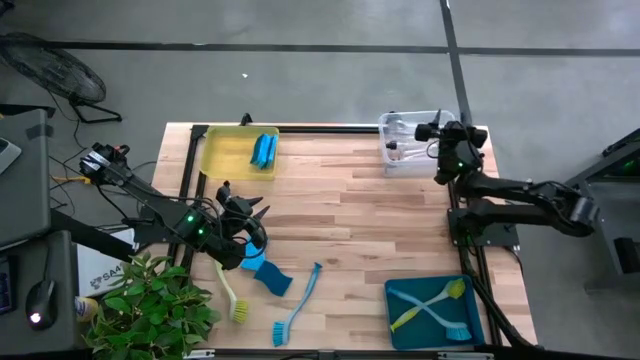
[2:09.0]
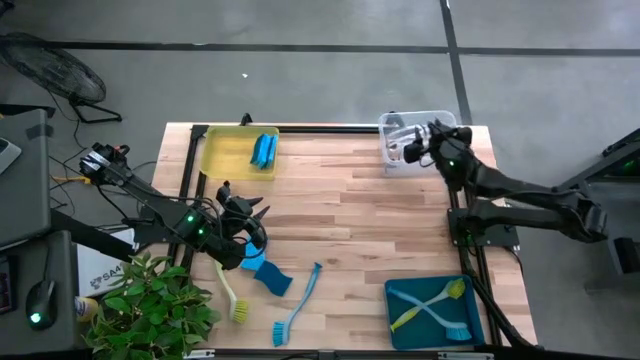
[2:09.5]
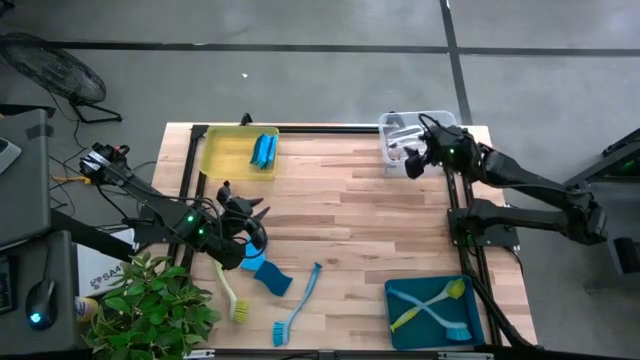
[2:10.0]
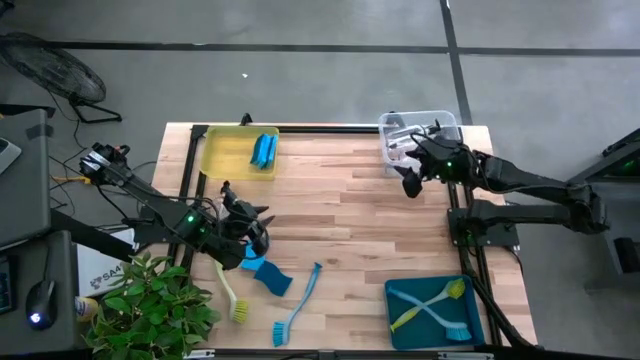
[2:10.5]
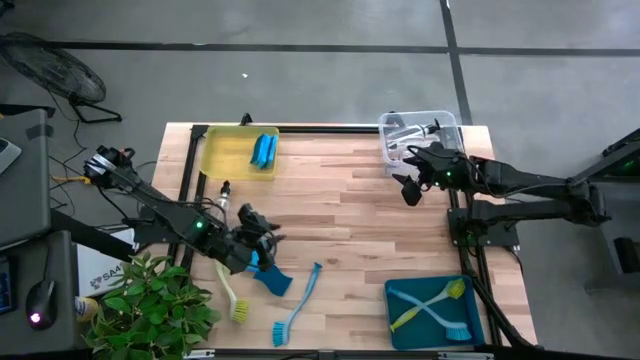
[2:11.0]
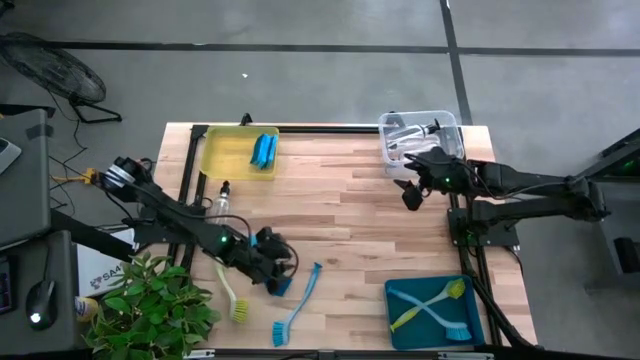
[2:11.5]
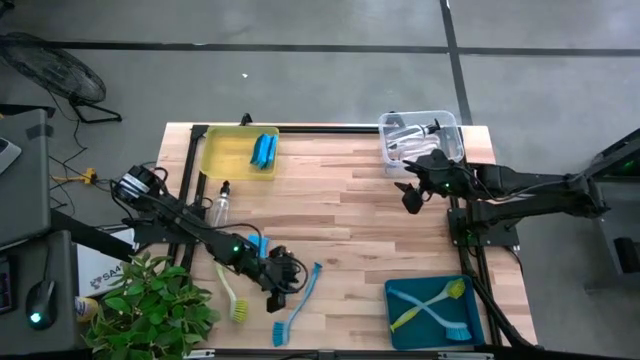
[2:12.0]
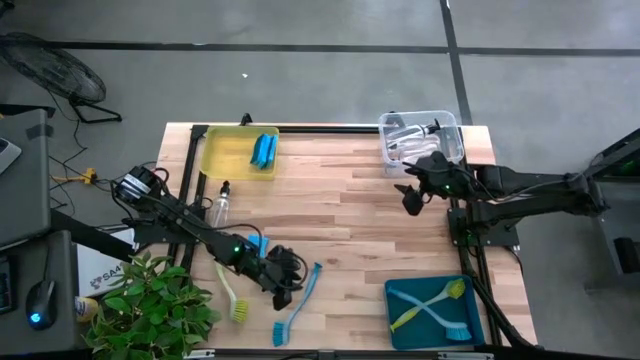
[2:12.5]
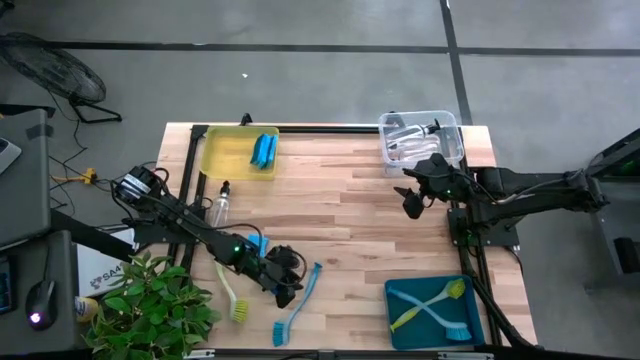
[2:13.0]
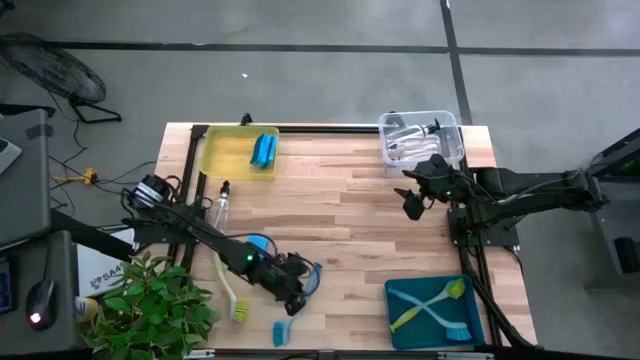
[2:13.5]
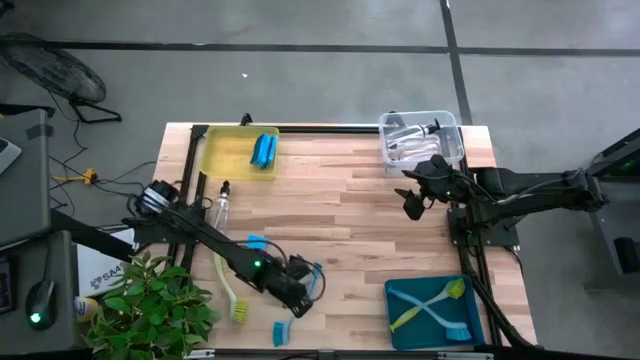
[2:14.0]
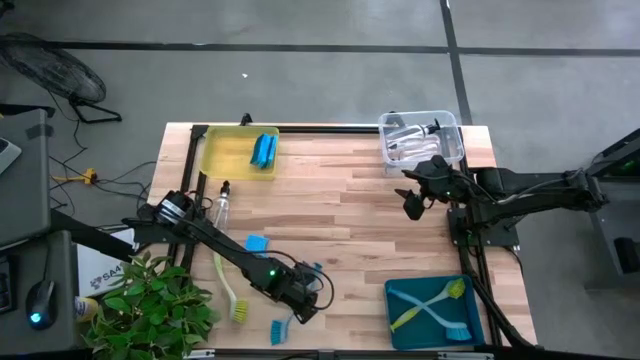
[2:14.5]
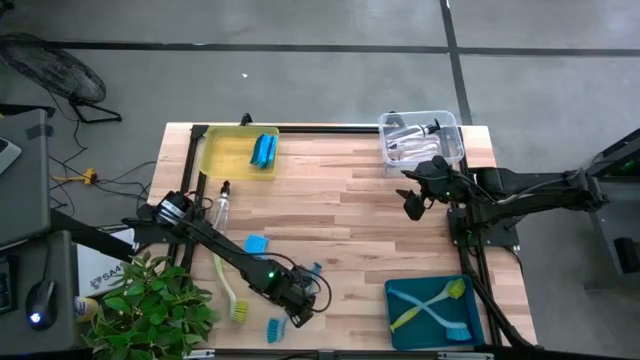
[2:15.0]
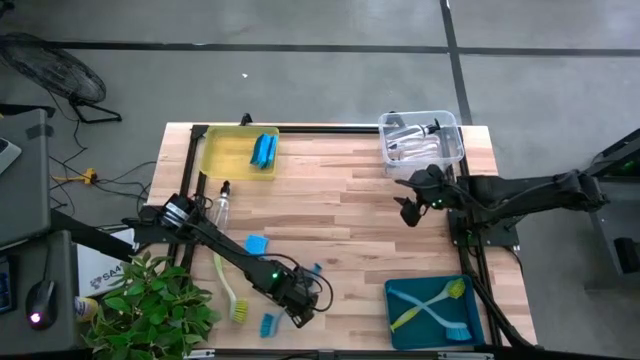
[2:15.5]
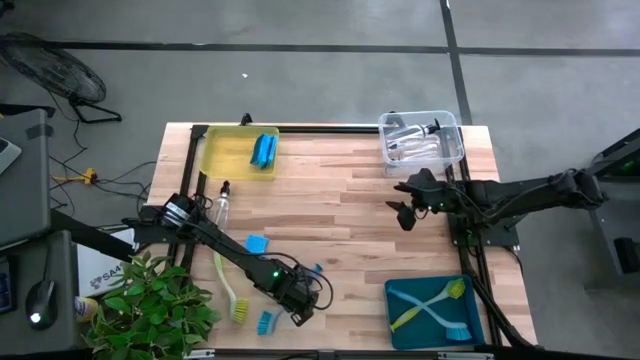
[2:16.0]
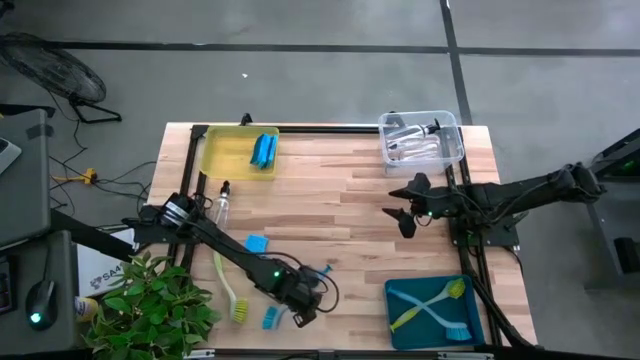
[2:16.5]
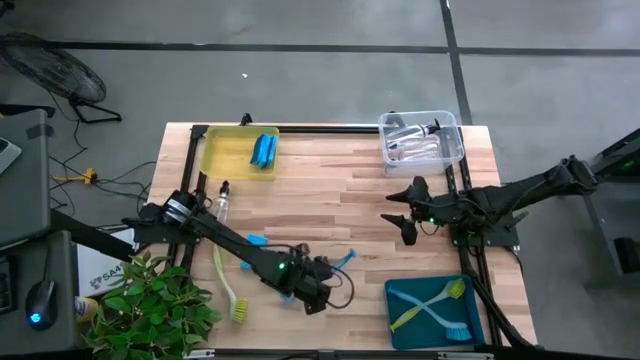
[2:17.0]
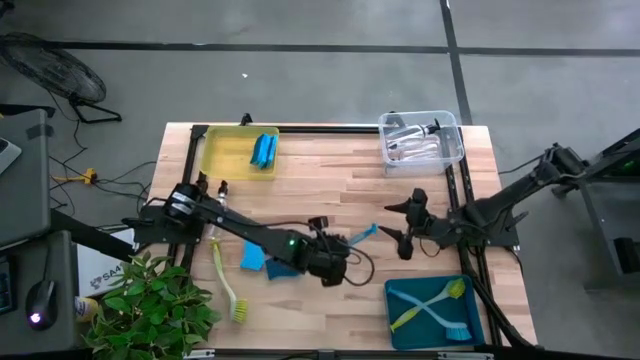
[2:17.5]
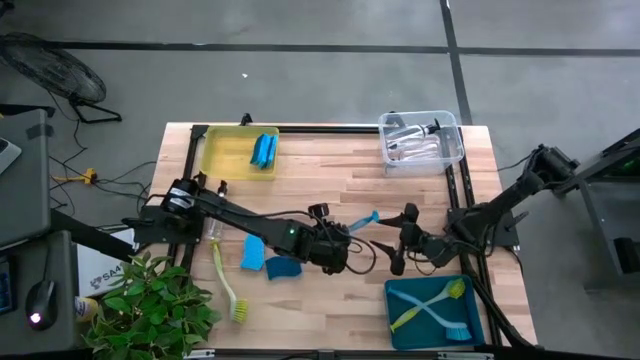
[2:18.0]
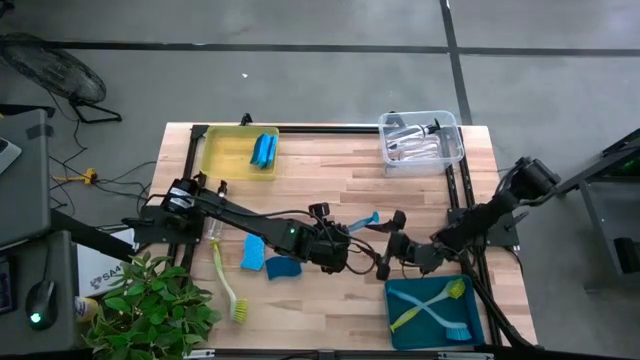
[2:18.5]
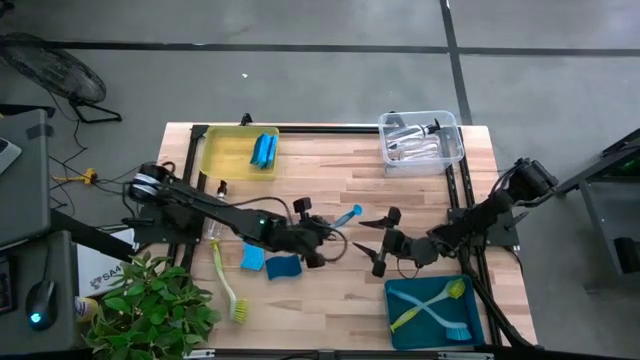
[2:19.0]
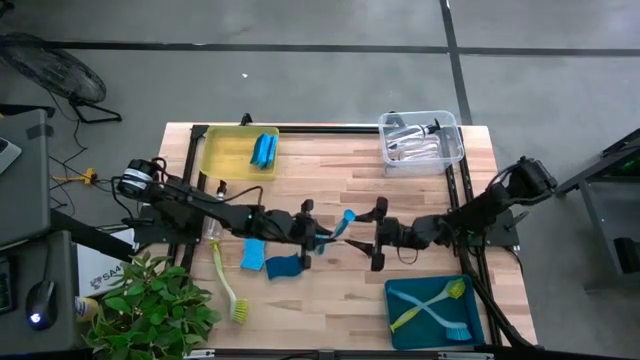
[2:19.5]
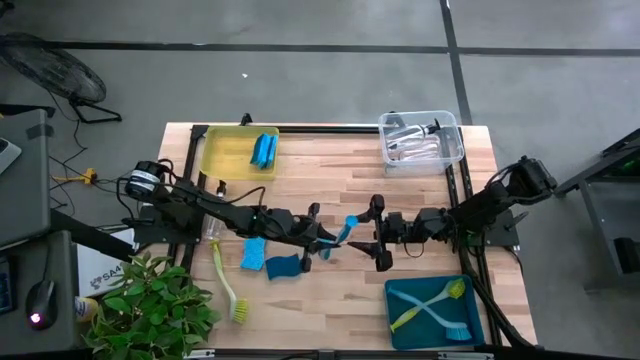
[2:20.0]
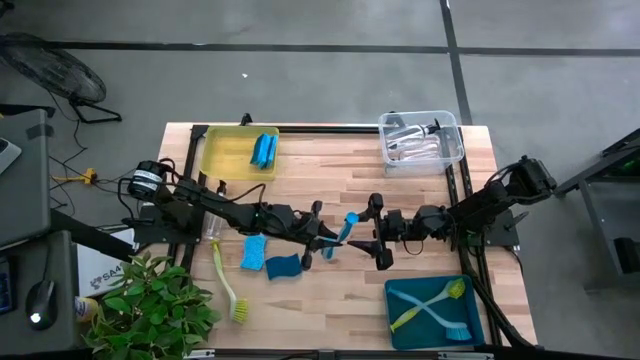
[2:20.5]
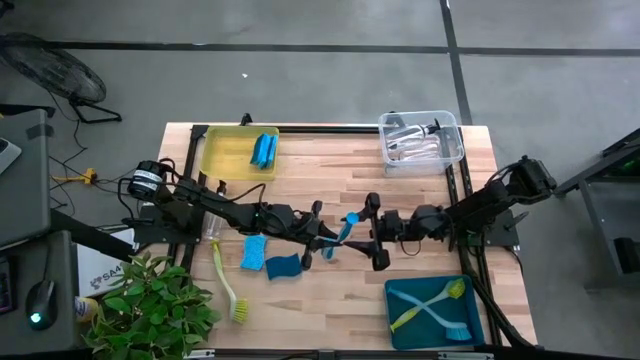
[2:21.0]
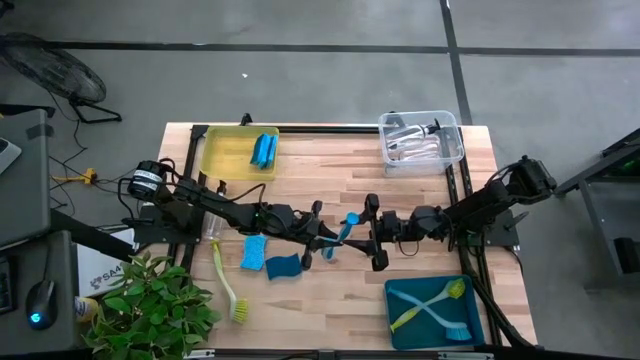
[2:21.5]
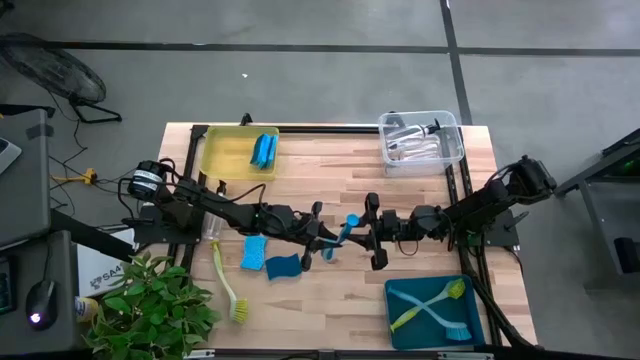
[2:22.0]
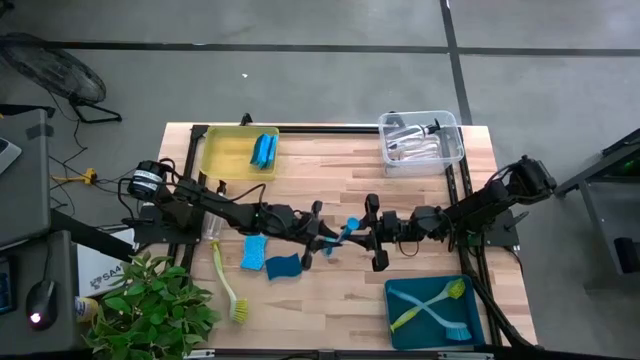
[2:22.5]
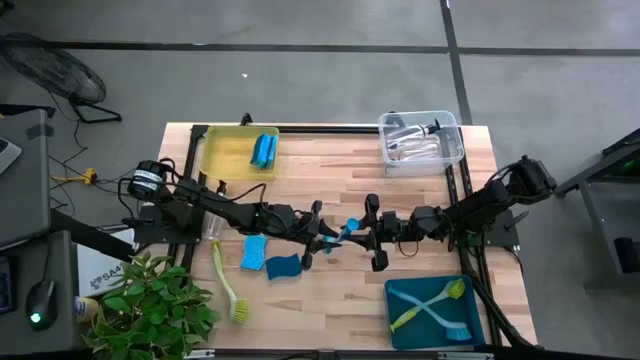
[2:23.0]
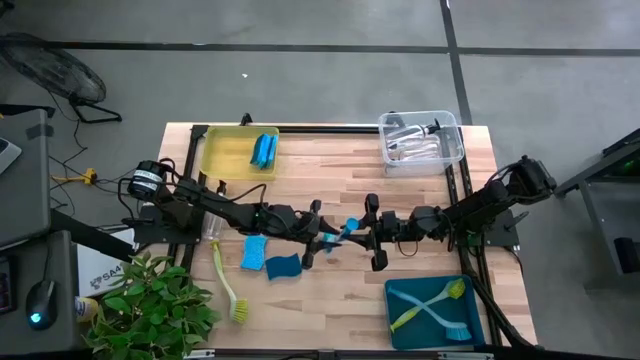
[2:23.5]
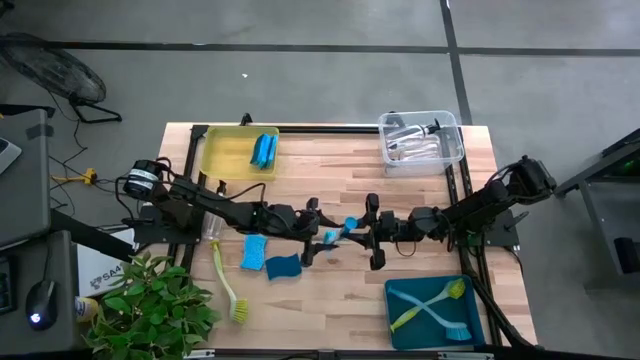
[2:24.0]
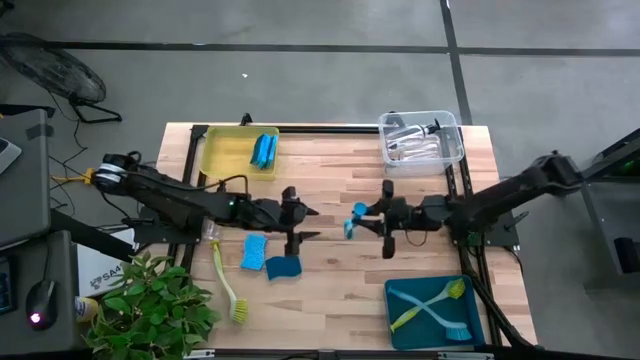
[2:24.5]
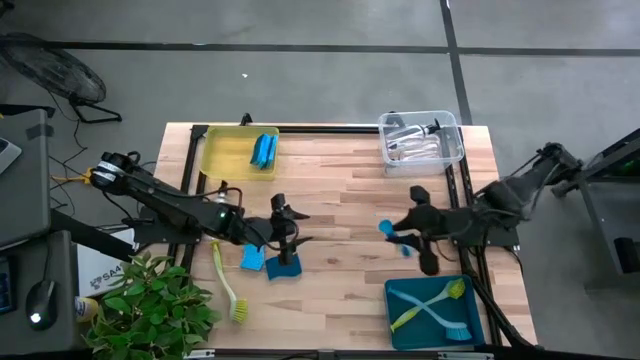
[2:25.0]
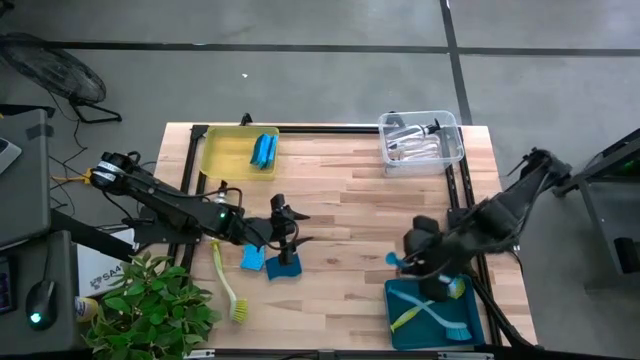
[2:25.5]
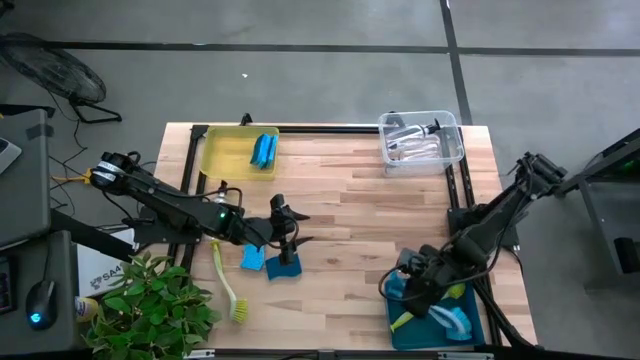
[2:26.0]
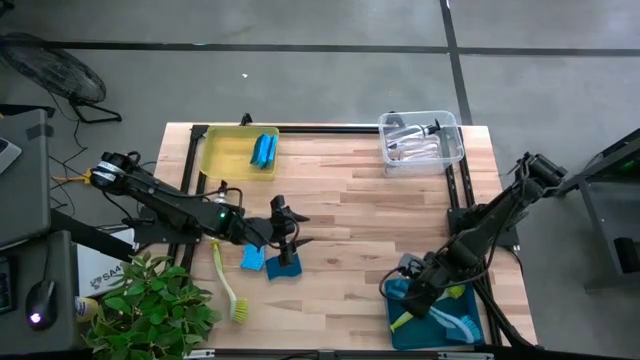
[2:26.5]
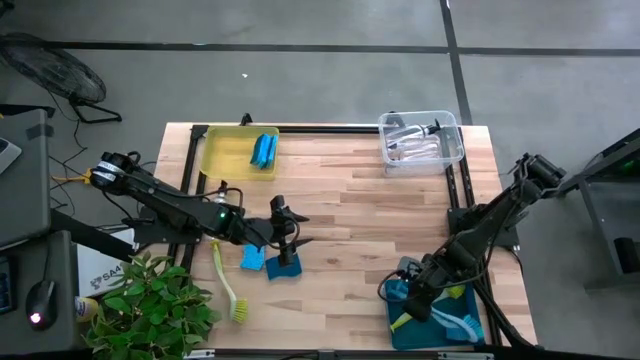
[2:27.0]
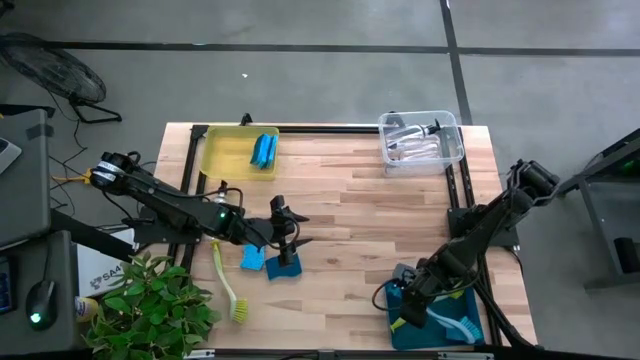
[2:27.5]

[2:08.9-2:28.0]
Task: Pick & Place Kitchen Sink Supplies
Put the blue dish brush into the blue bin

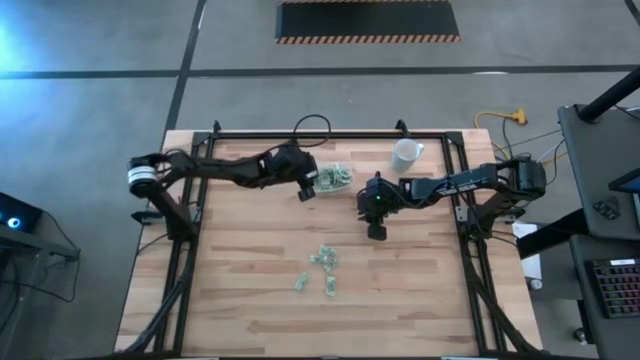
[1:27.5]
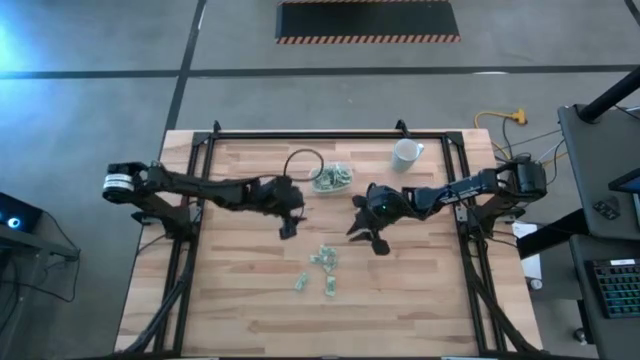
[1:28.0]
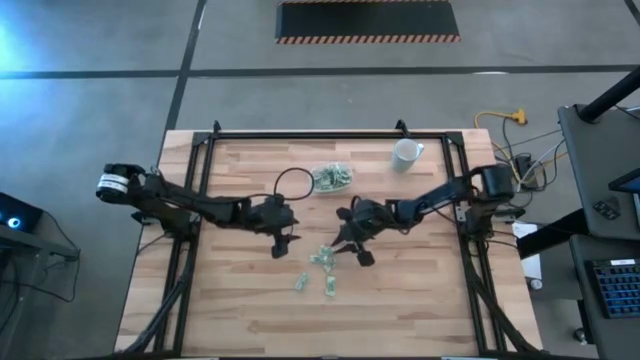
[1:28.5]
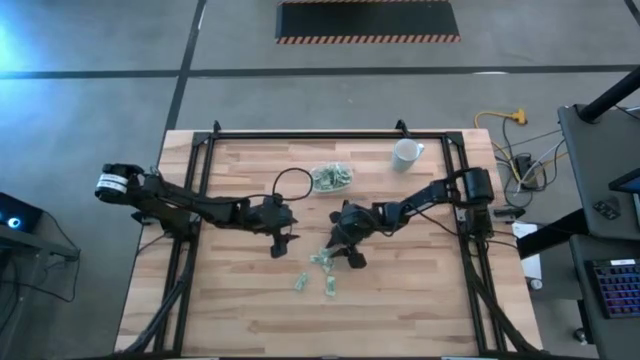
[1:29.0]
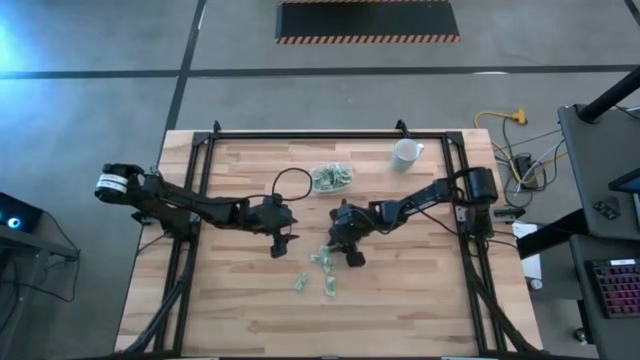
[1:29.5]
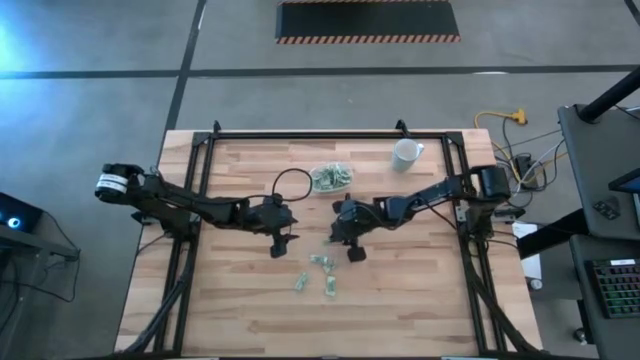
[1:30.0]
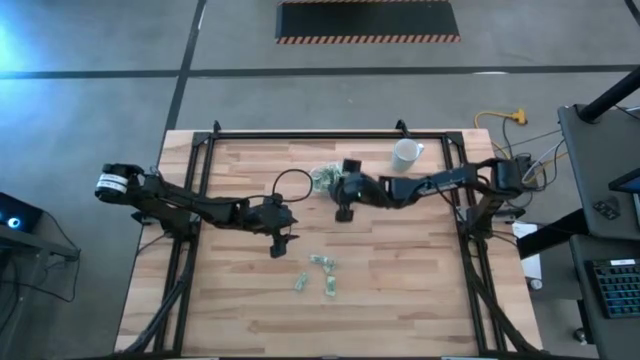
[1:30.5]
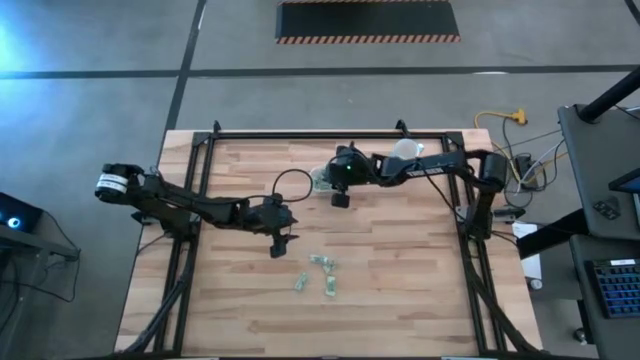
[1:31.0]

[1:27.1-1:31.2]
Task: Pick and place Stevia / Truvia into bins
Put the stevia packet into the transparent container
